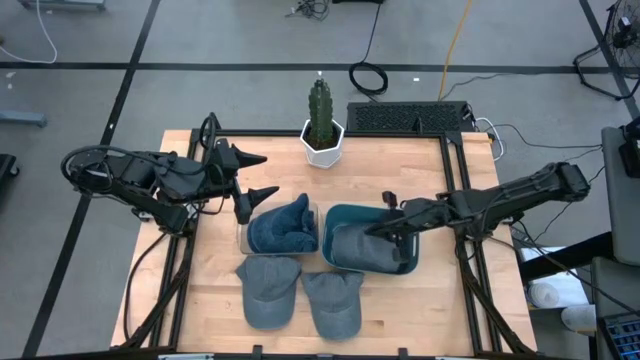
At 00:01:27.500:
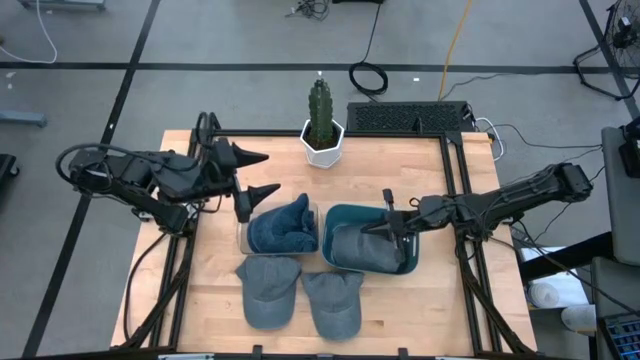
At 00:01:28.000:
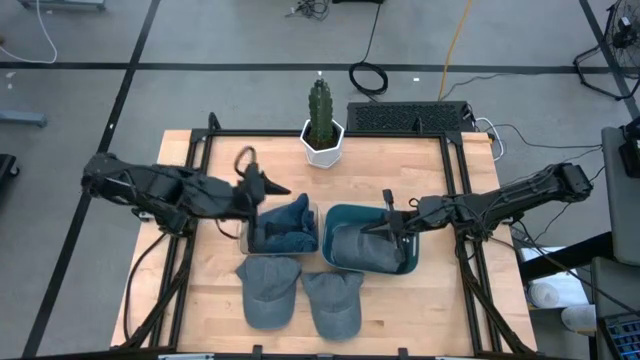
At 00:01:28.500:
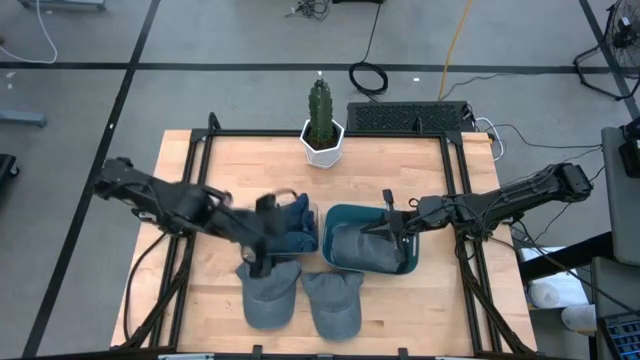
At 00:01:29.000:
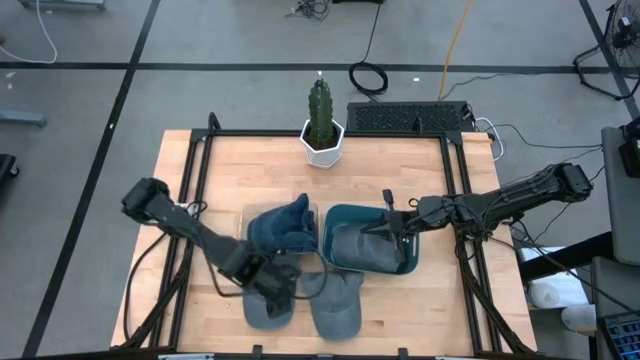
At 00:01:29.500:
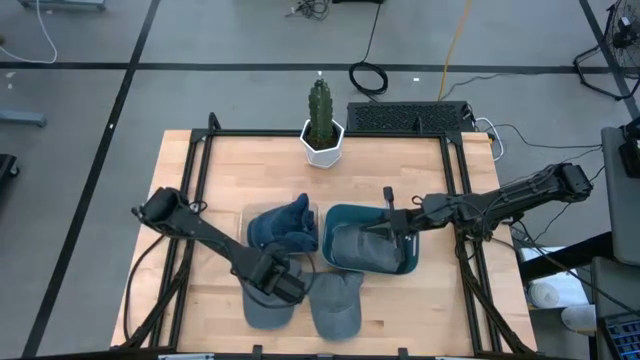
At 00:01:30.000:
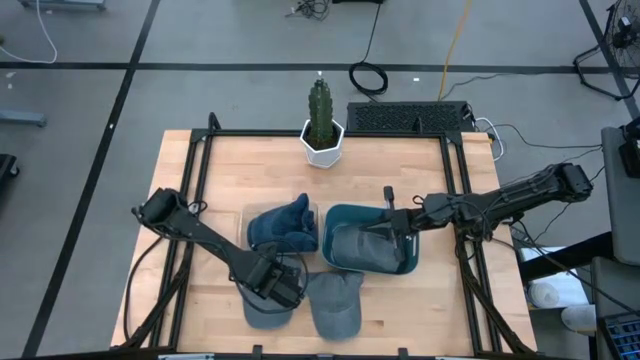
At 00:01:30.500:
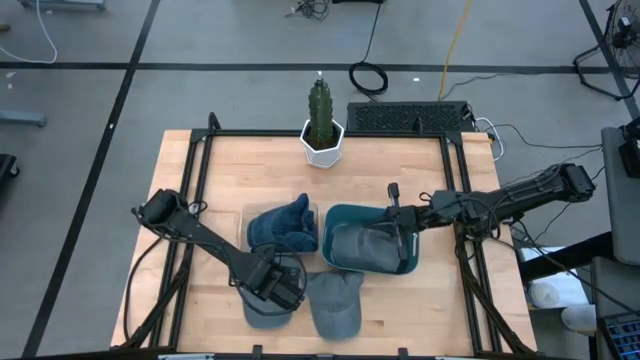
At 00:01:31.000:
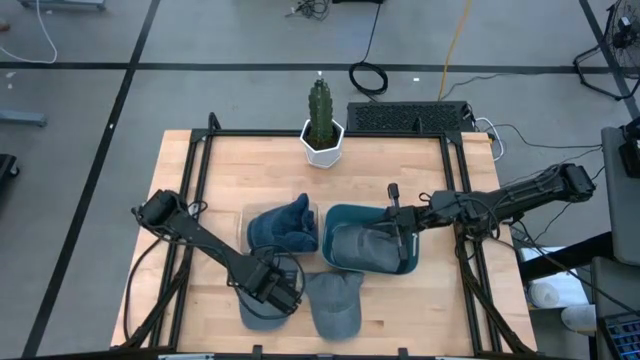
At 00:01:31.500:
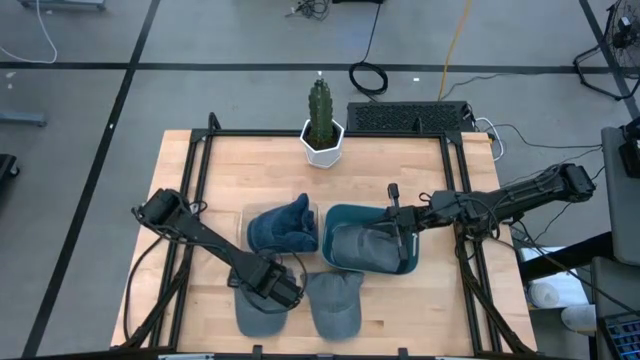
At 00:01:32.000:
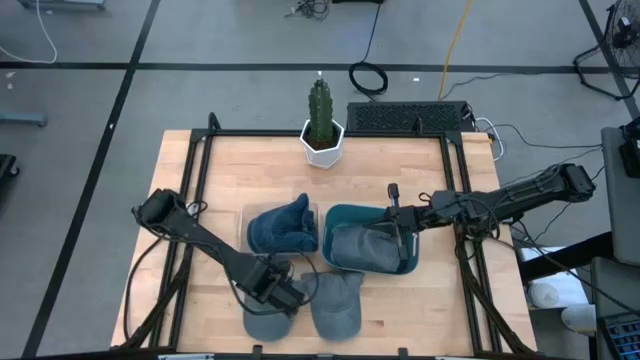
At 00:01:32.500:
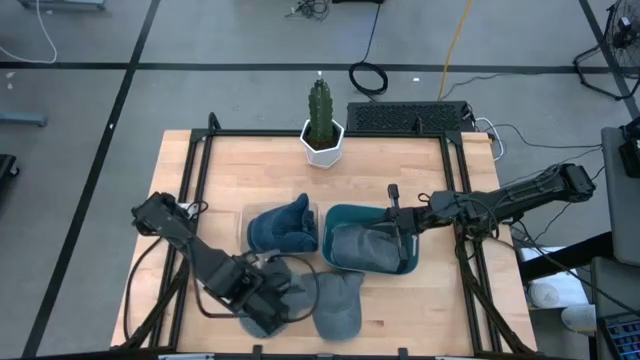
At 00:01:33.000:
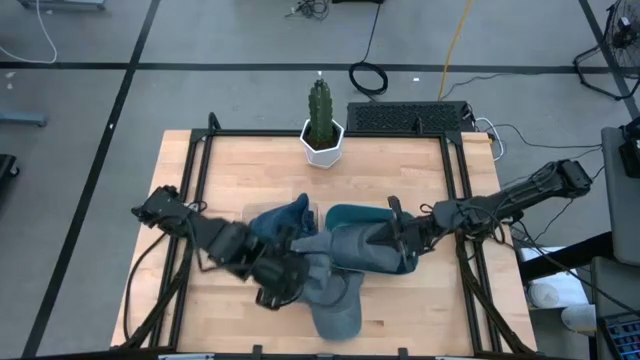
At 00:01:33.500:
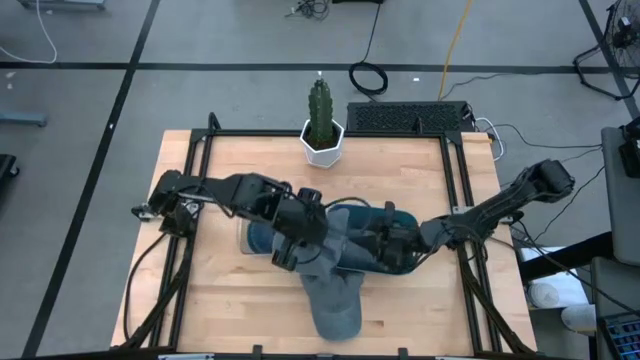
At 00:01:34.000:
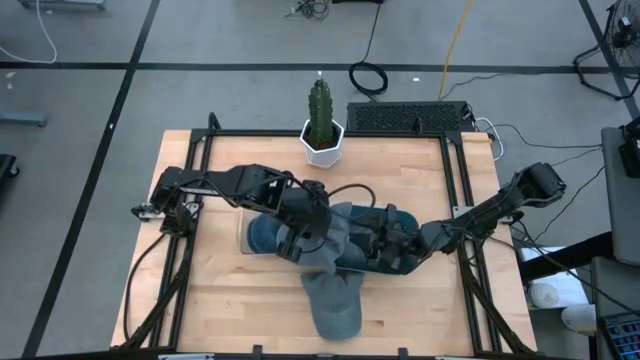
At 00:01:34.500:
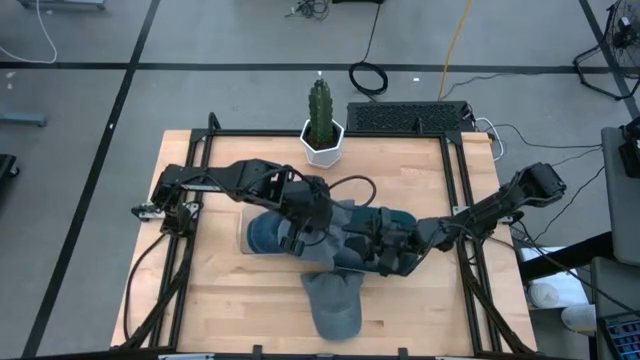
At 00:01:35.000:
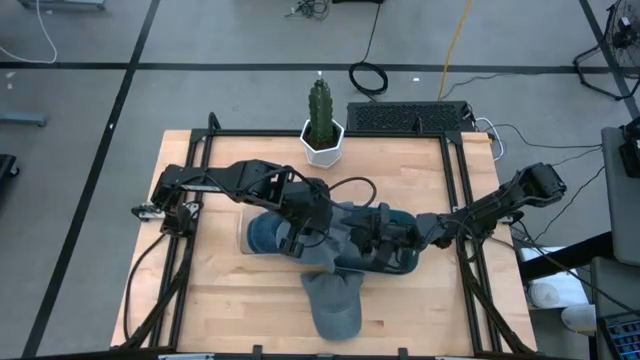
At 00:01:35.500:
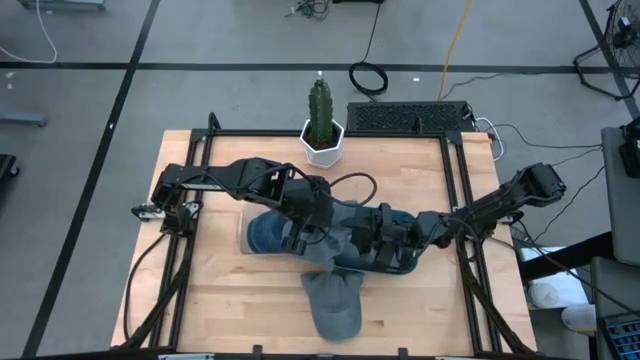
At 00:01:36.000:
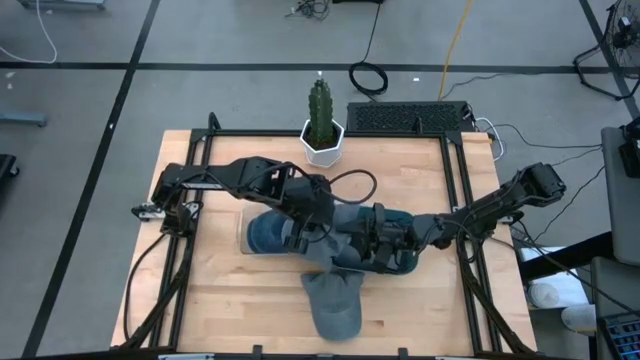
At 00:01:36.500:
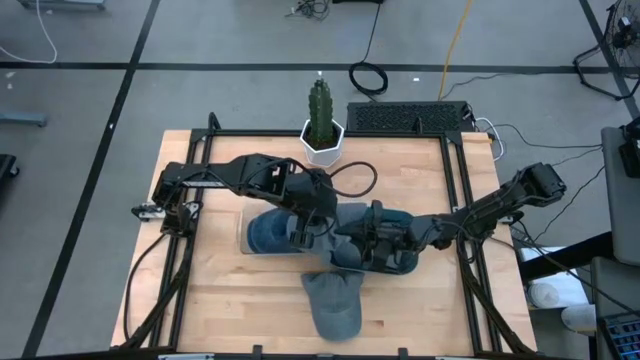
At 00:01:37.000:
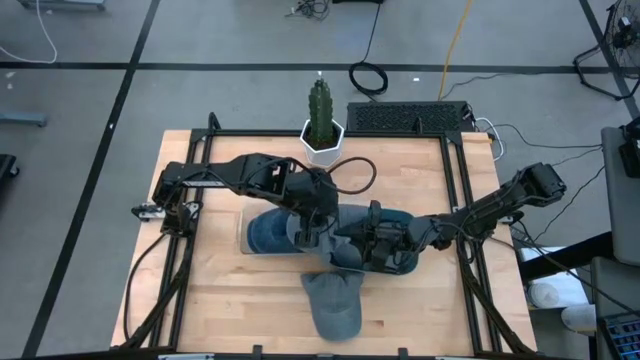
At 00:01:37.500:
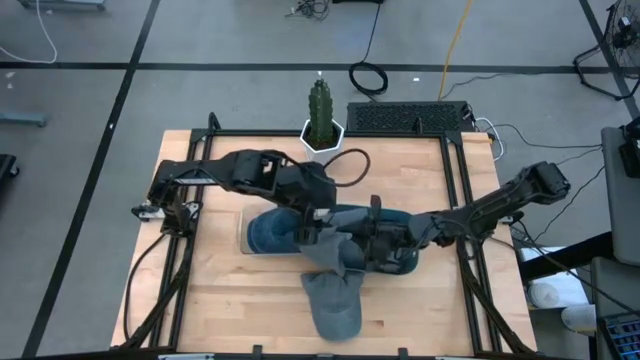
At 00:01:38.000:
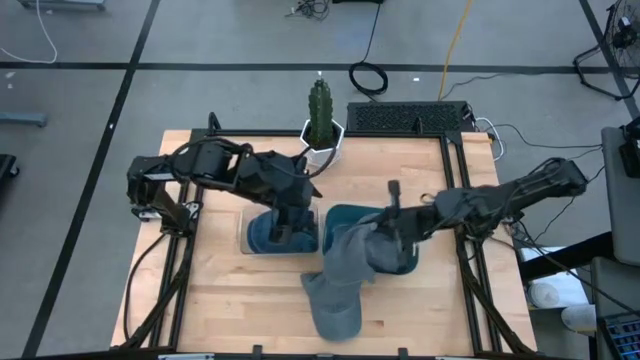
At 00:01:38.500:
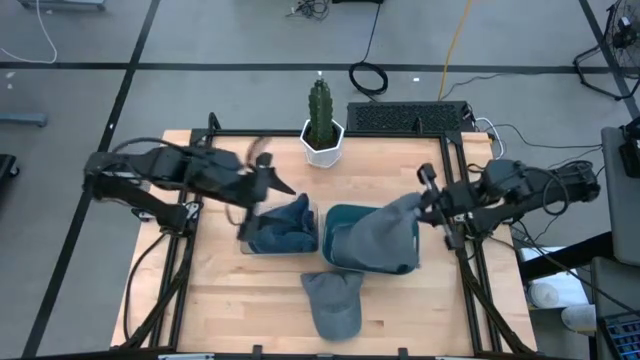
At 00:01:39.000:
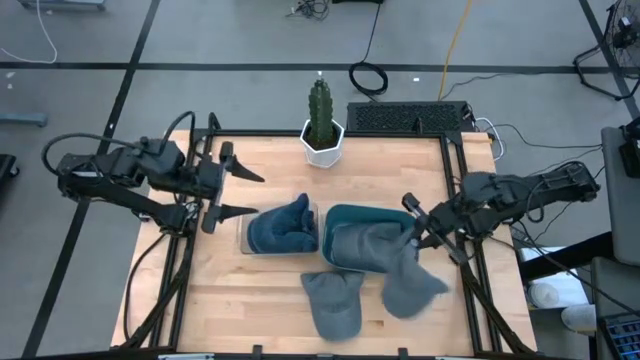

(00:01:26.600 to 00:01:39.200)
Task: Pick & Place hat
Put the left gray cap into the blue bin

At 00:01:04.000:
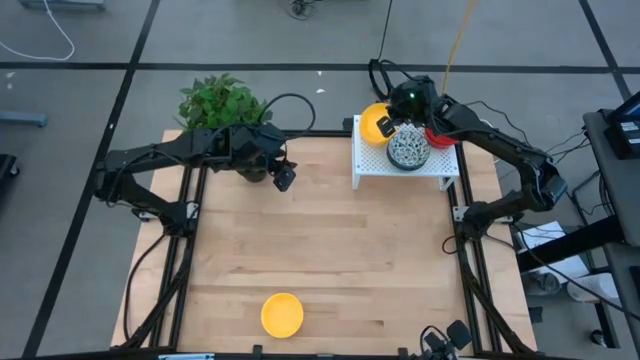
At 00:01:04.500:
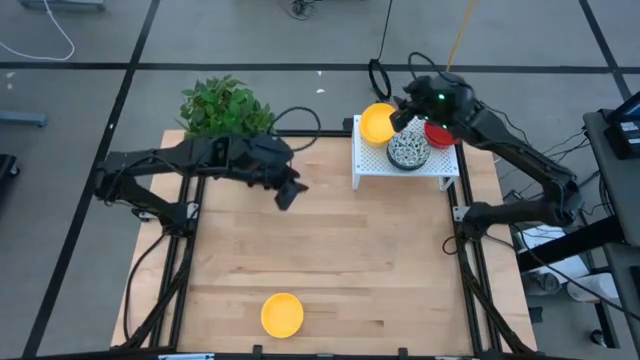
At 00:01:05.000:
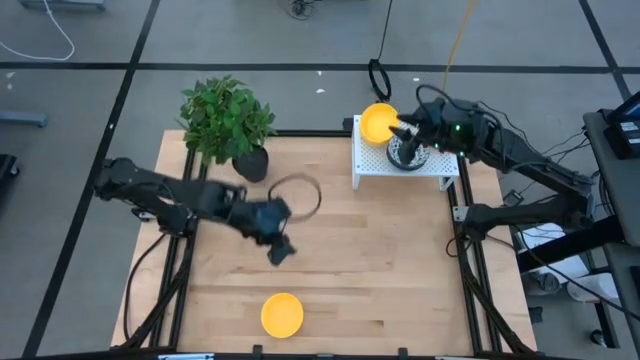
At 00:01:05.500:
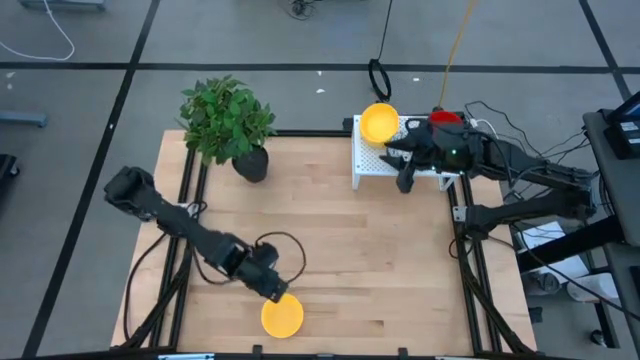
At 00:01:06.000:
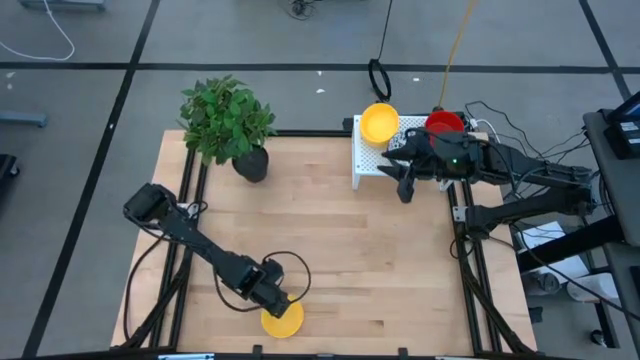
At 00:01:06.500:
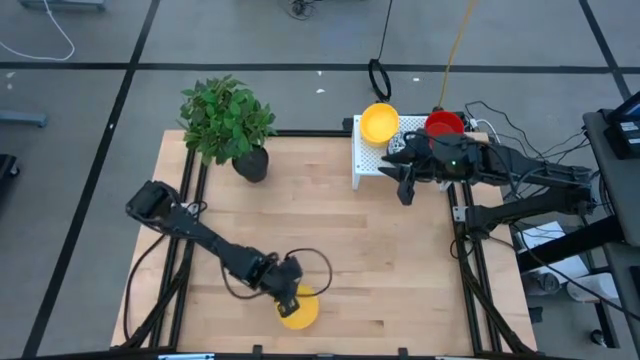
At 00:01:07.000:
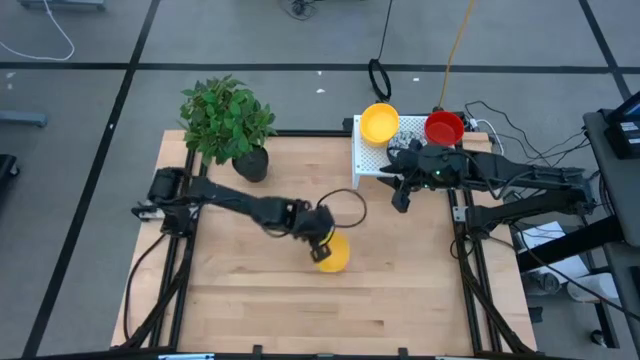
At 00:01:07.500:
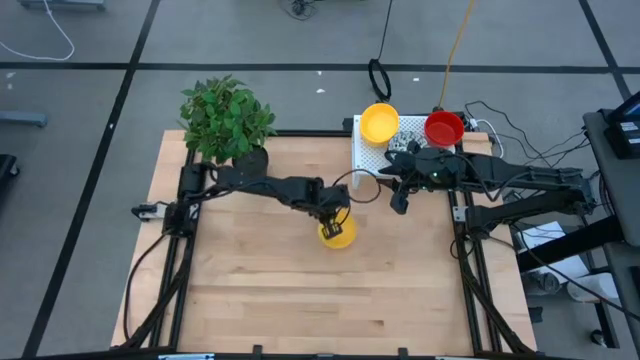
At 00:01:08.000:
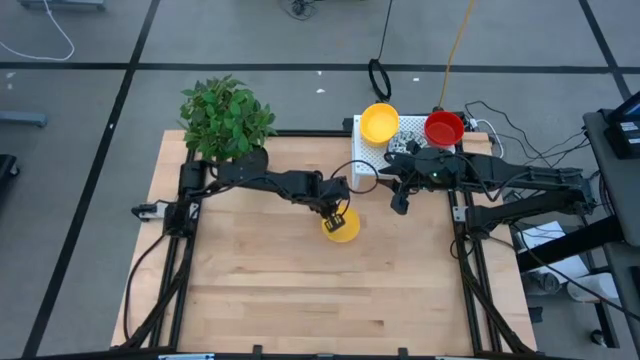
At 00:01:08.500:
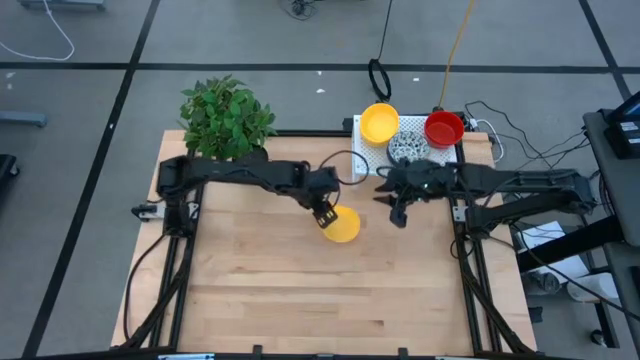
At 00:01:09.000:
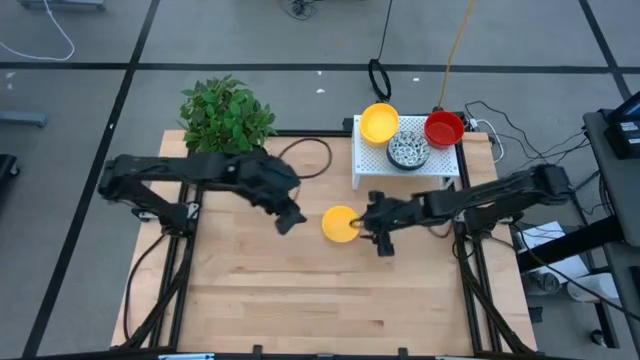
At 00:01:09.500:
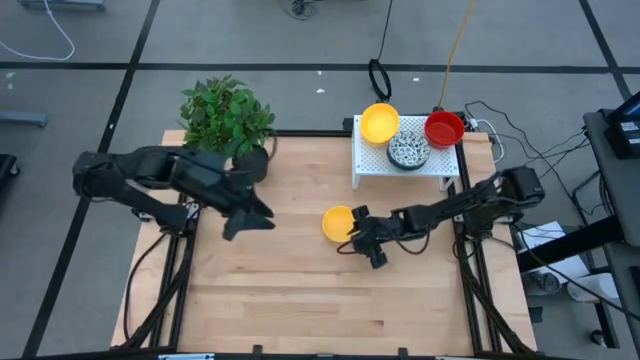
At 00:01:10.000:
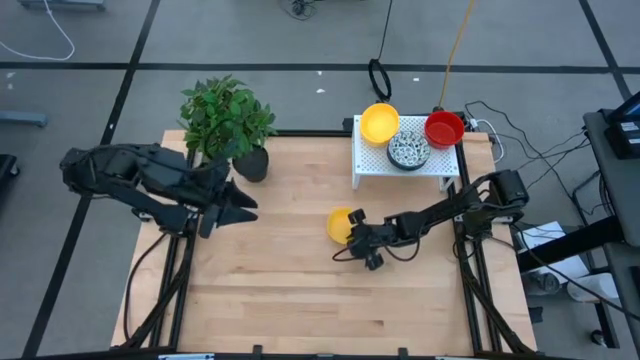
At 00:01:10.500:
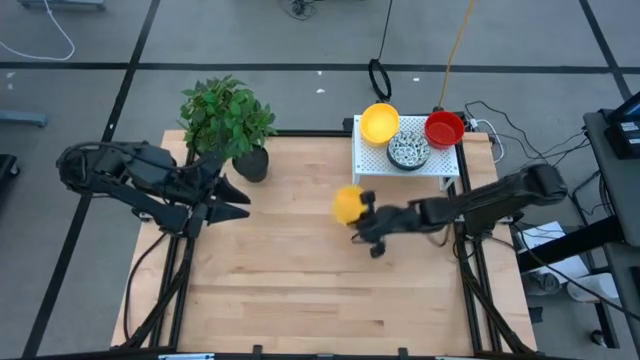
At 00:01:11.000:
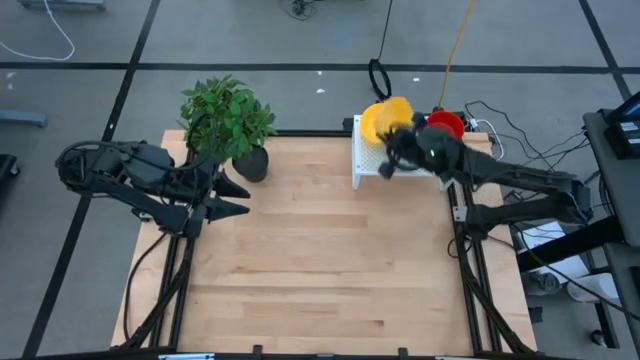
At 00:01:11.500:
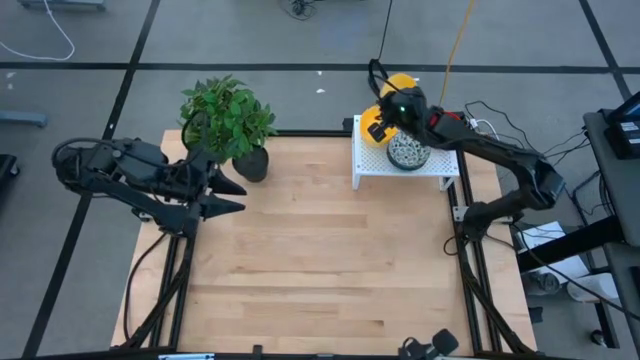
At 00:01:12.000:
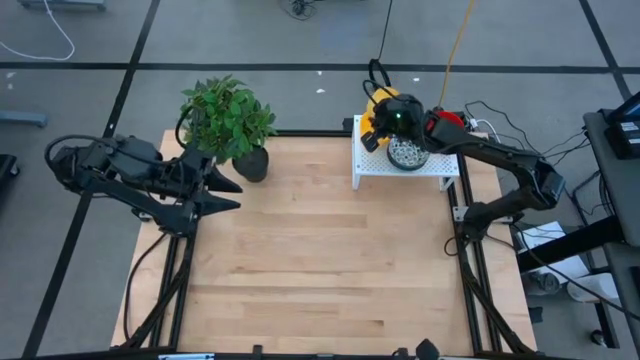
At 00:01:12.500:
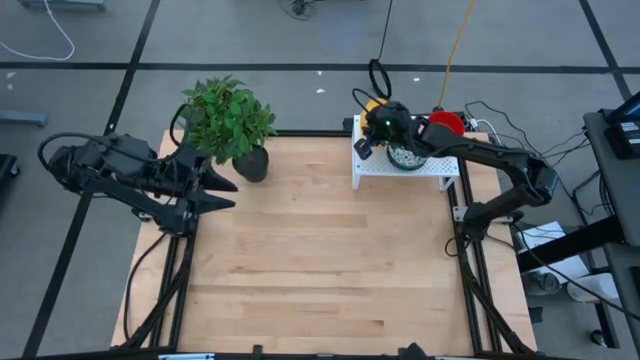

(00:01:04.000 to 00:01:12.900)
Task: Pick & Place Mini bowls
Stack the yellow bowl on top of the yellow bowls on the shelf
